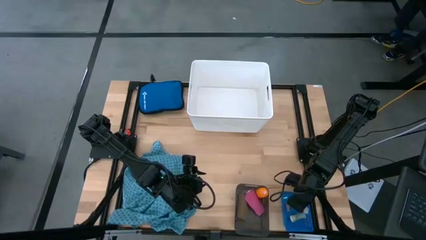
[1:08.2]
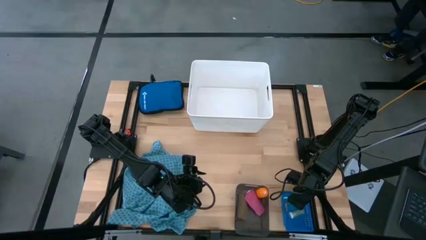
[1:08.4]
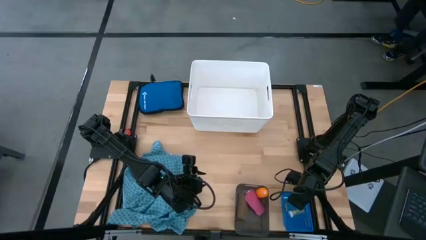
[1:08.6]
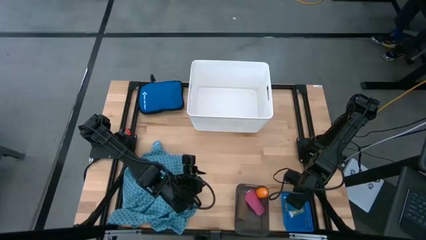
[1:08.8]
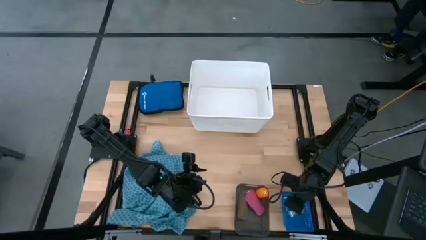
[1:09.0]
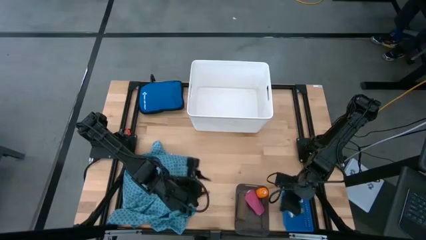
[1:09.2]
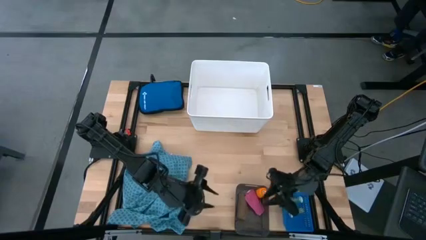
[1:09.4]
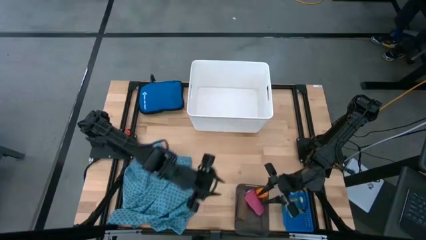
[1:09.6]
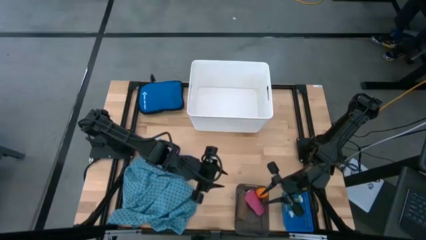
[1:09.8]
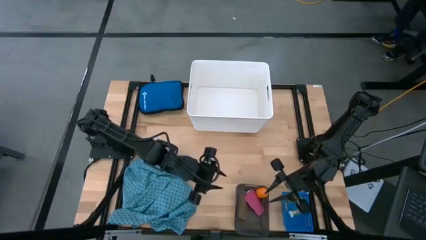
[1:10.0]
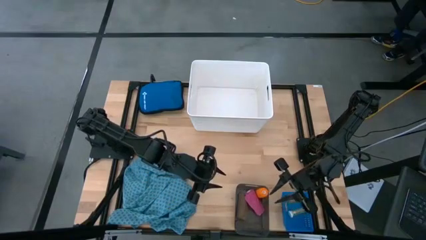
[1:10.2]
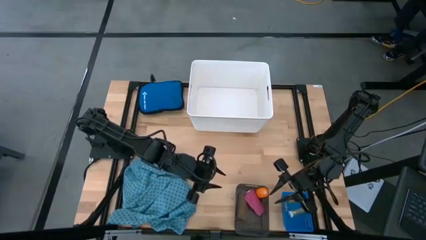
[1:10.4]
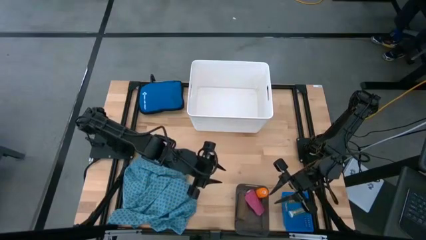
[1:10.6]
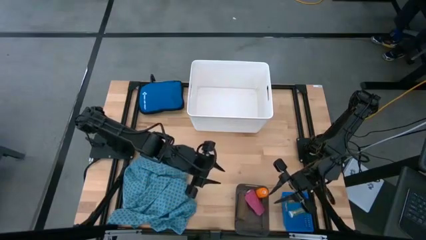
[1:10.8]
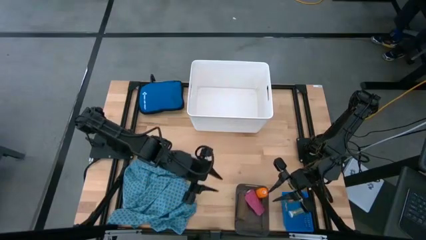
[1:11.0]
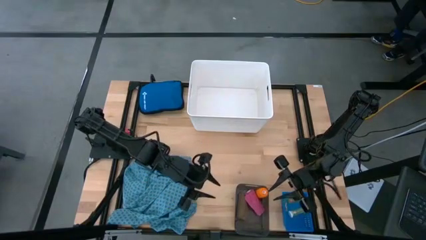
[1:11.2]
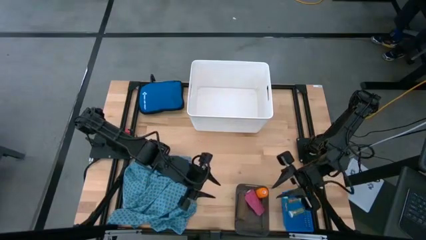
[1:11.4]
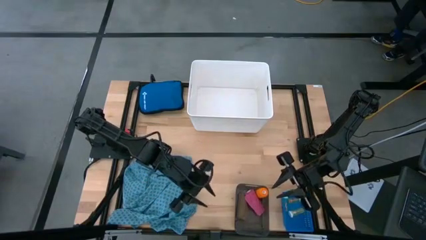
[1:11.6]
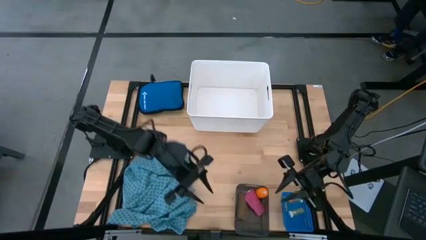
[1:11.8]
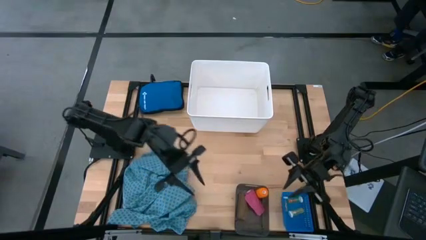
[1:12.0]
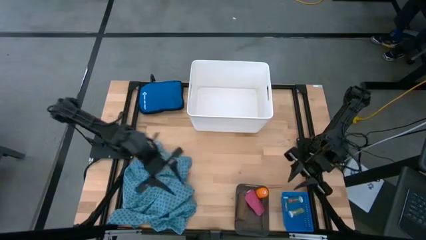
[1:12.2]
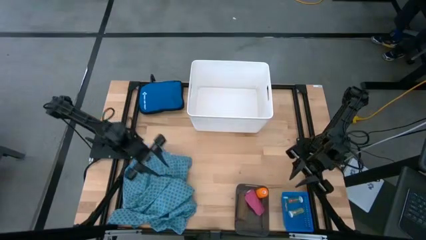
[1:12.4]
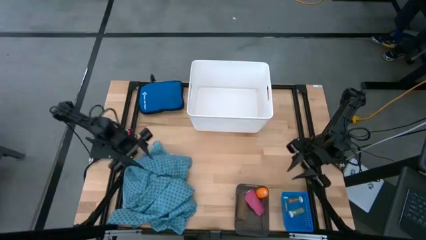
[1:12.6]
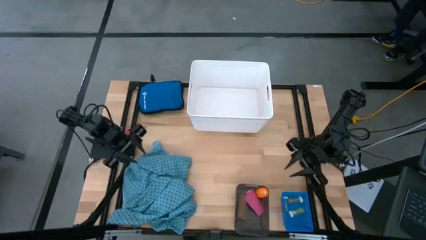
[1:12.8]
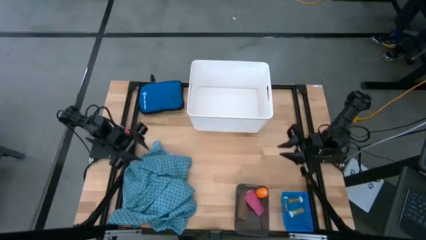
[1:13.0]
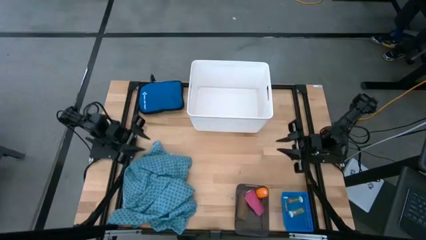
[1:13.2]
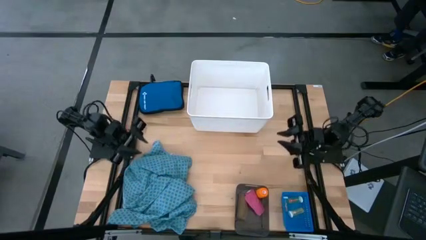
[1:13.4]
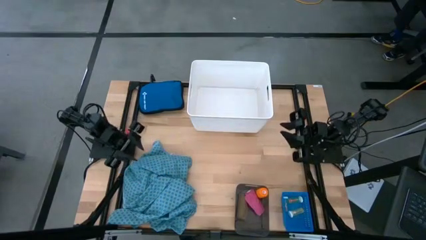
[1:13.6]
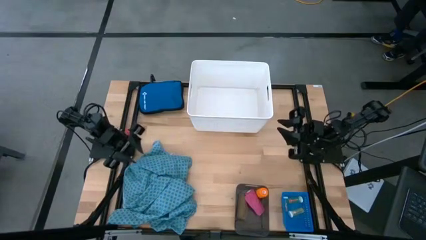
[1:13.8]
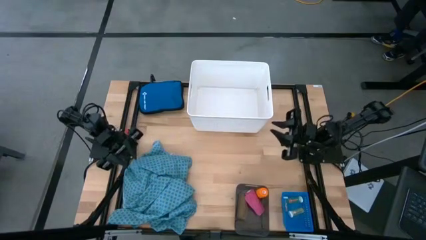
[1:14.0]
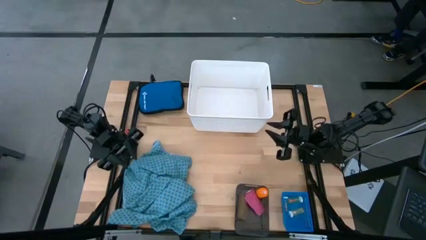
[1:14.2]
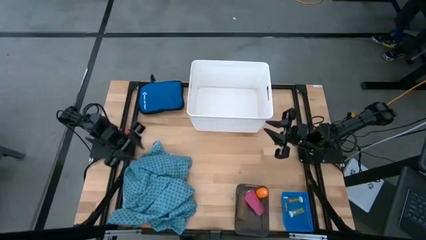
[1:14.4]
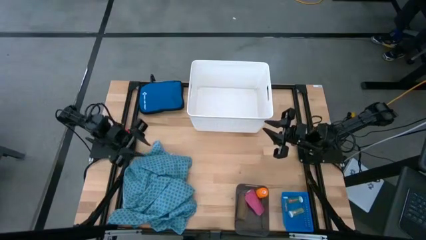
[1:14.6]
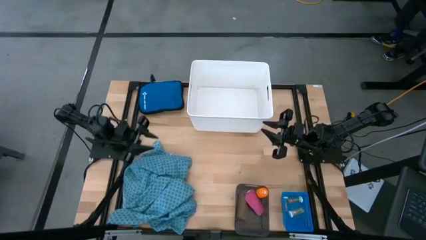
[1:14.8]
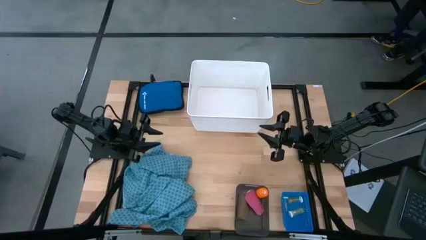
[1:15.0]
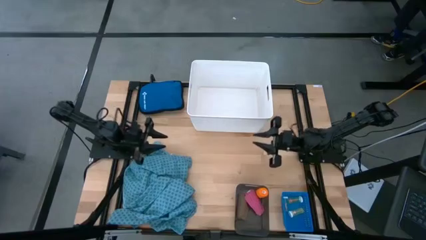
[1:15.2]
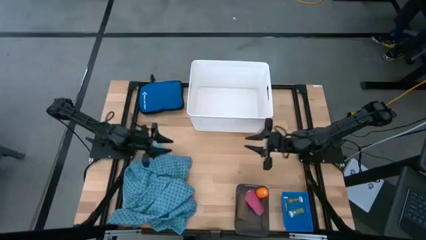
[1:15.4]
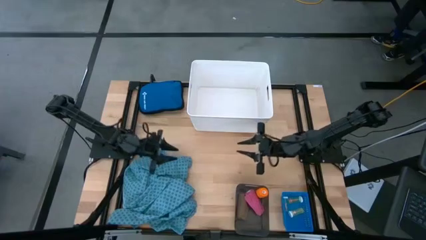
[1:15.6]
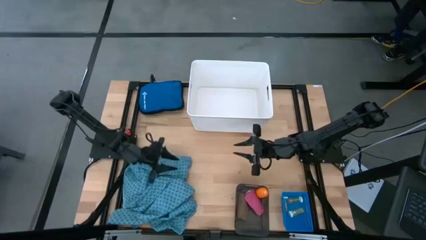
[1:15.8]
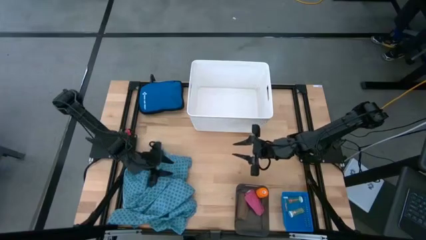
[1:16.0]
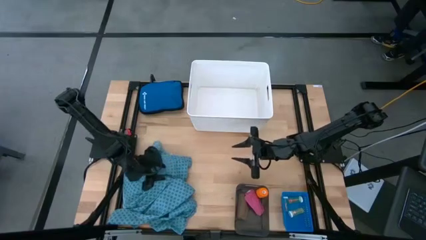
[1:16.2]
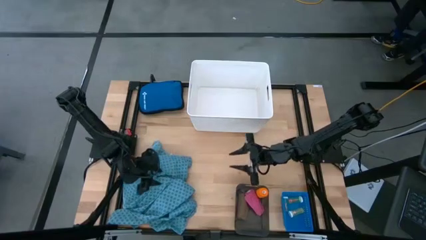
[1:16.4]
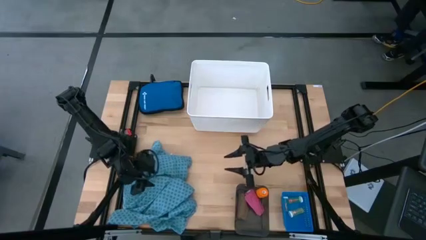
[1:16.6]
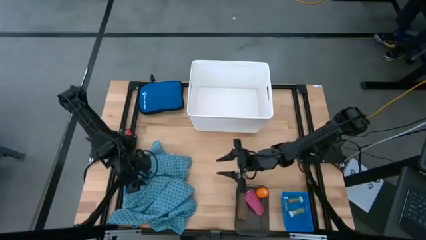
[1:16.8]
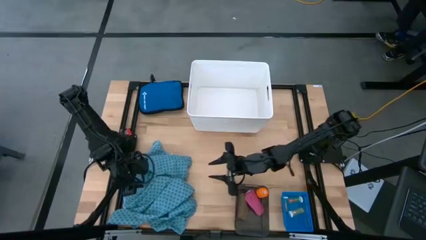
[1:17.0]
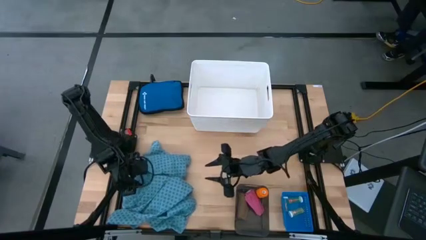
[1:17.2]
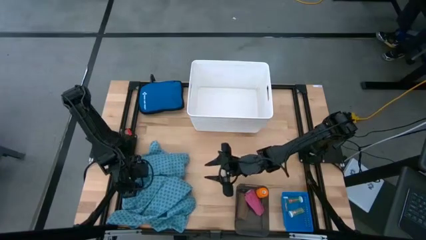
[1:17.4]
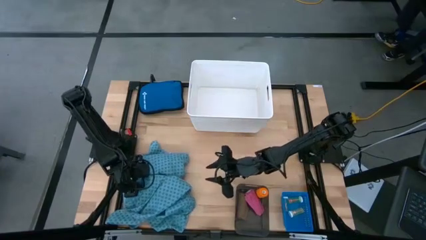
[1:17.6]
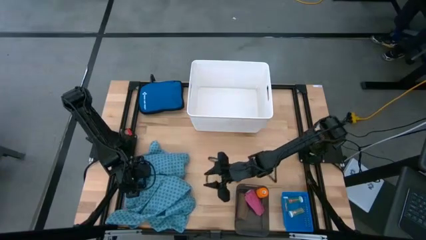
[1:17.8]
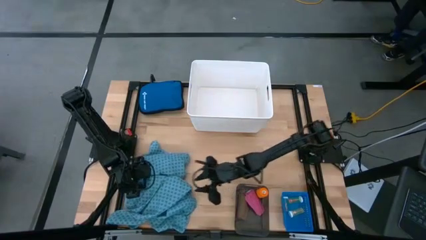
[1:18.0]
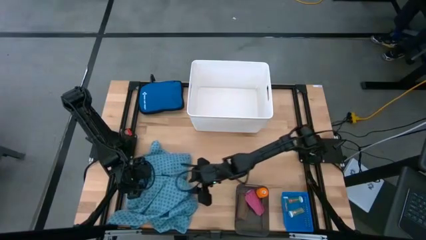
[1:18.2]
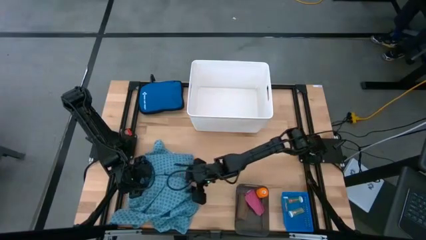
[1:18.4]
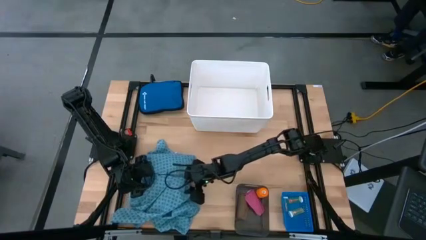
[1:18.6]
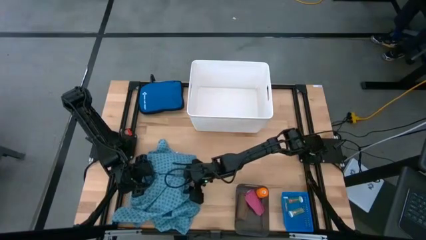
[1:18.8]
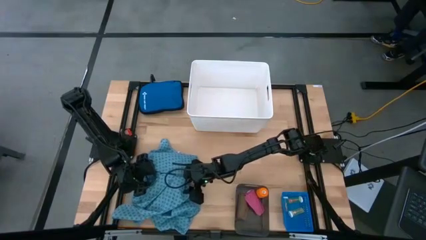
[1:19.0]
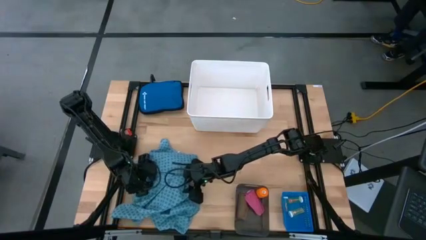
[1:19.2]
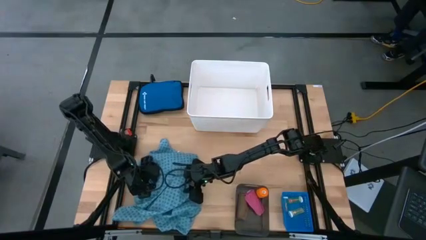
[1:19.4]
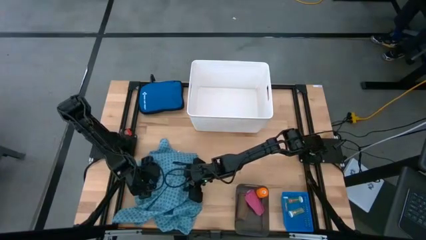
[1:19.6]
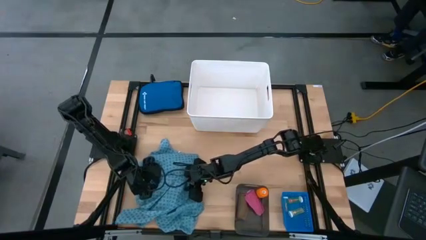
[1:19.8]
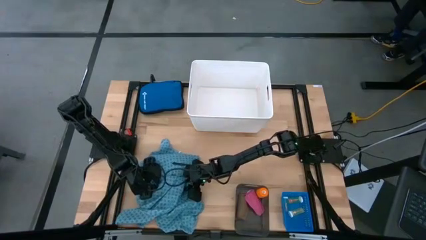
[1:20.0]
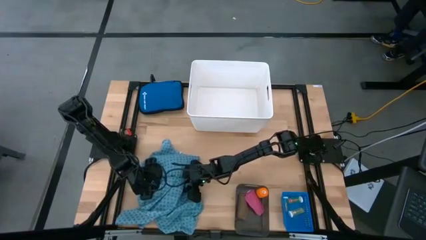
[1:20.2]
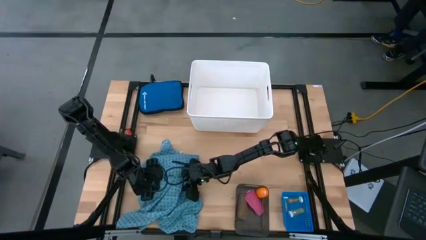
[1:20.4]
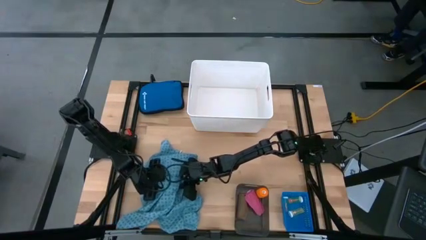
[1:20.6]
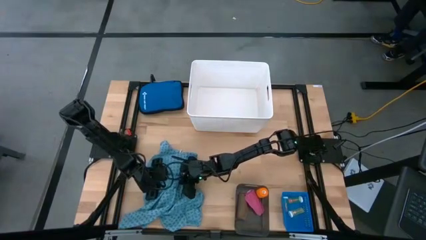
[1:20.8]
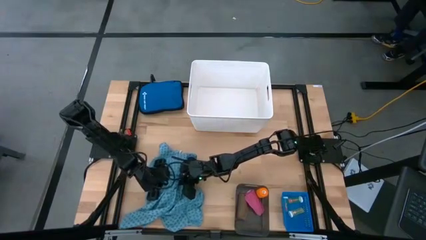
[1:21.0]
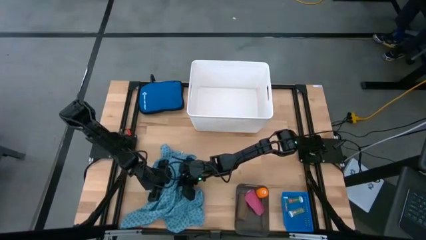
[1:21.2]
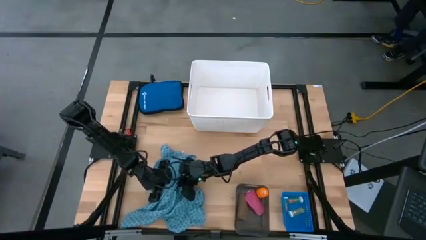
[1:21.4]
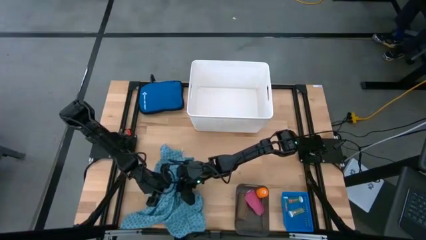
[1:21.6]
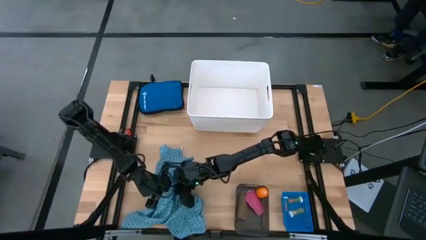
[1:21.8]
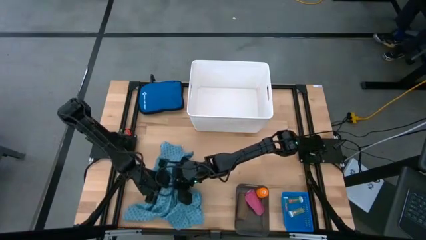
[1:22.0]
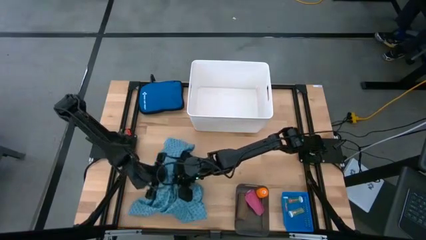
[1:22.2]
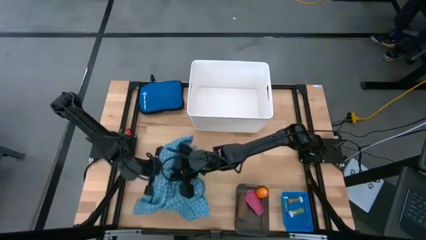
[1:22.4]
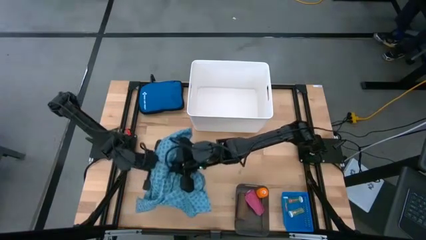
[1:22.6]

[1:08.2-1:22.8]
Task: Pick & place medical supplies in basket/bin
Put the blue patient gown into the white bin

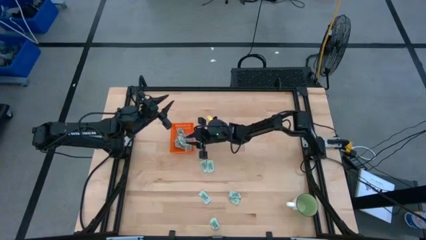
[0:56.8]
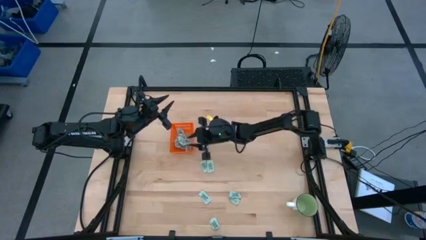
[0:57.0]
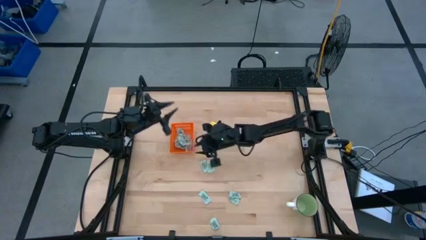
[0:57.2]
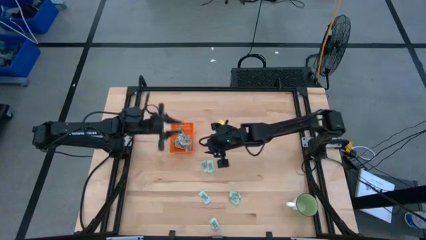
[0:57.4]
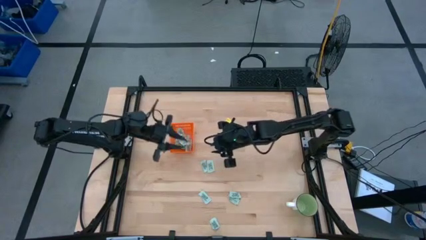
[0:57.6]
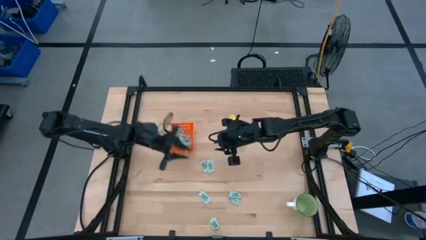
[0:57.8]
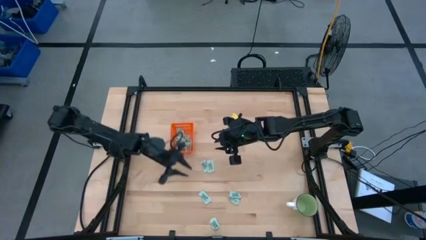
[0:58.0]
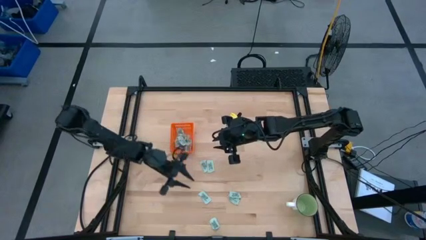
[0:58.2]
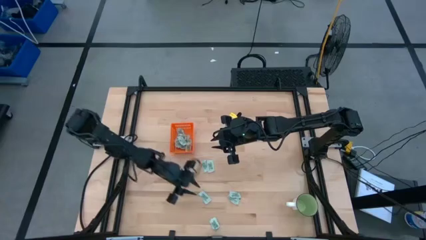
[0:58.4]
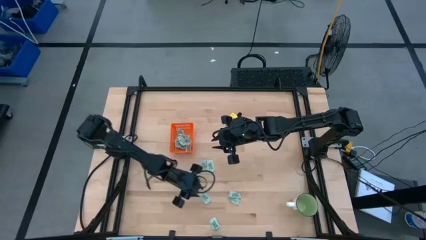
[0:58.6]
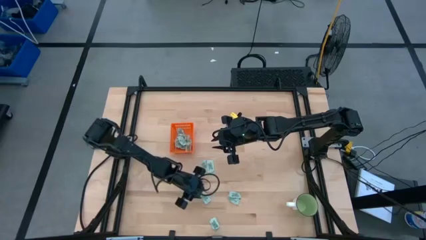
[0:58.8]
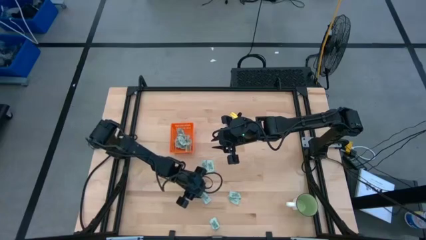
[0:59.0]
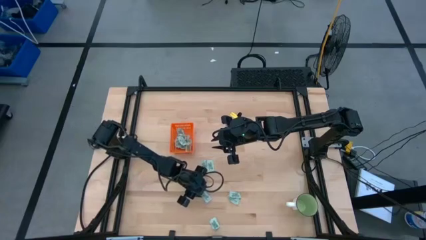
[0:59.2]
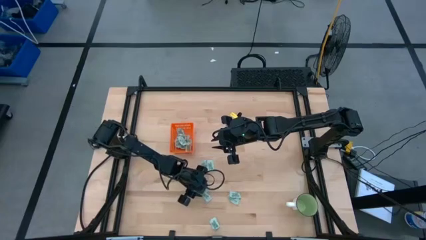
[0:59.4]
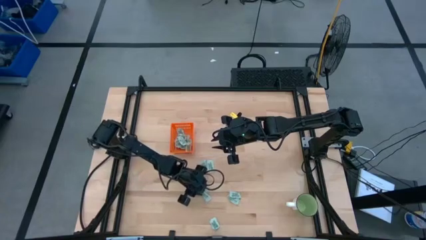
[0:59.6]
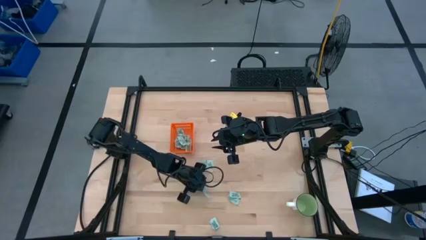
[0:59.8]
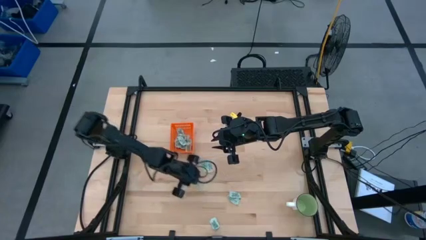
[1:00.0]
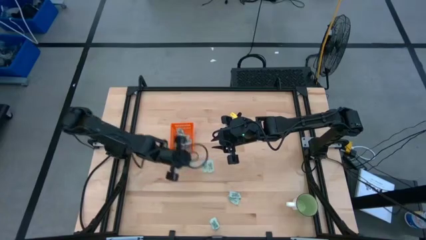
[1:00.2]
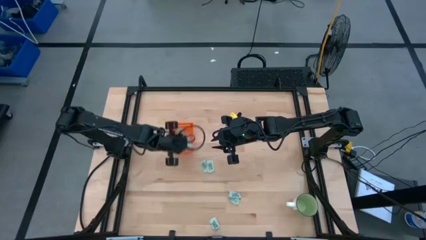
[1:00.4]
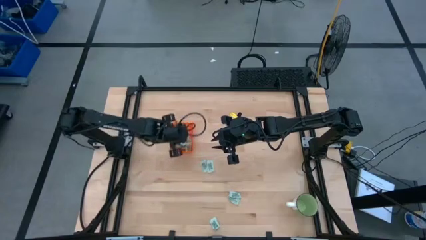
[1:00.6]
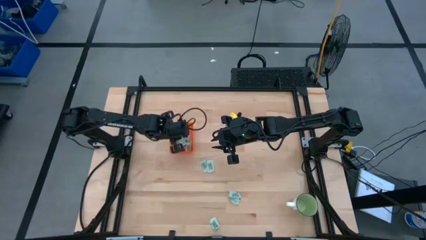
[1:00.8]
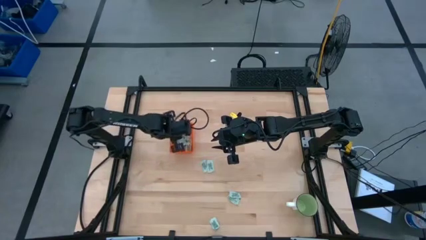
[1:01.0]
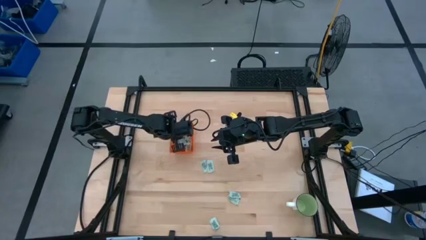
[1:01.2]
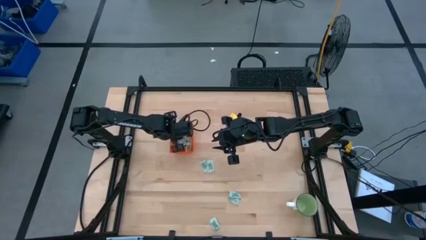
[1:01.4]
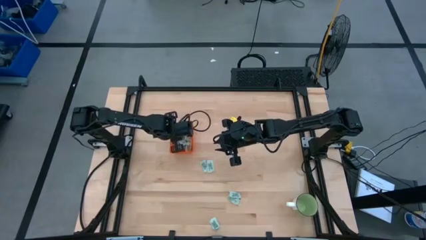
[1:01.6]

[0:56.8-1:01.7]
Task: Pick and place Stevia / Truvia into bins
Put the green stevia packet into the orange bin
